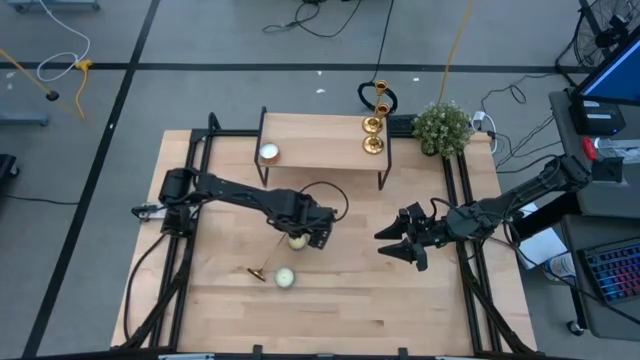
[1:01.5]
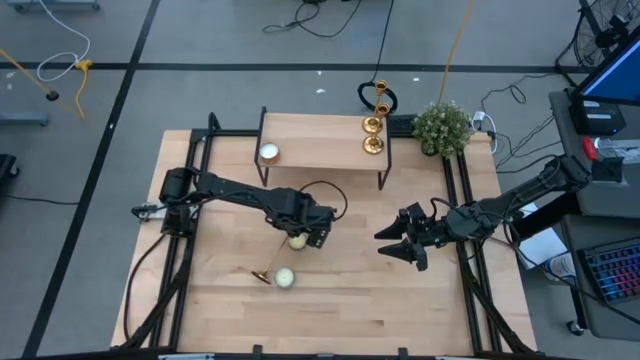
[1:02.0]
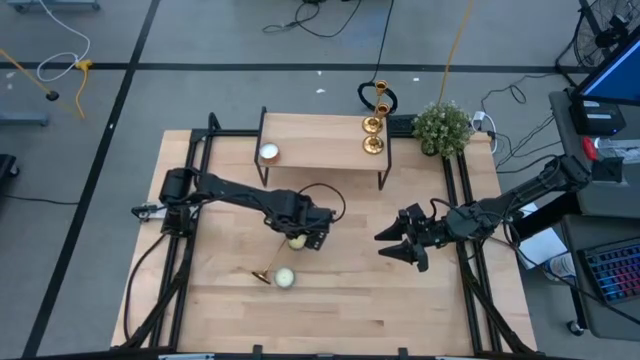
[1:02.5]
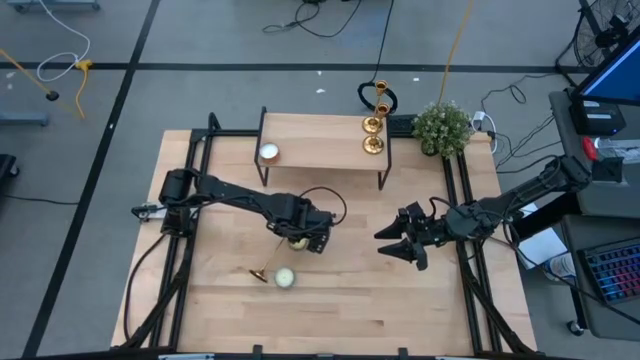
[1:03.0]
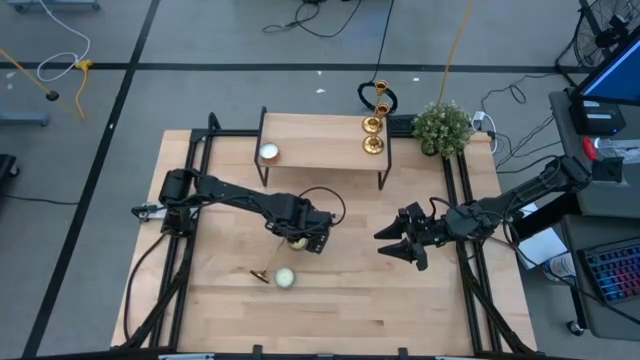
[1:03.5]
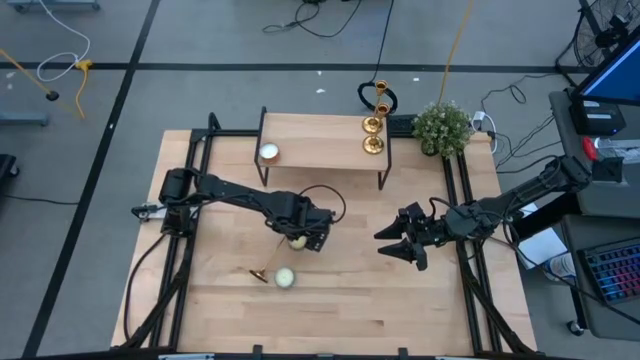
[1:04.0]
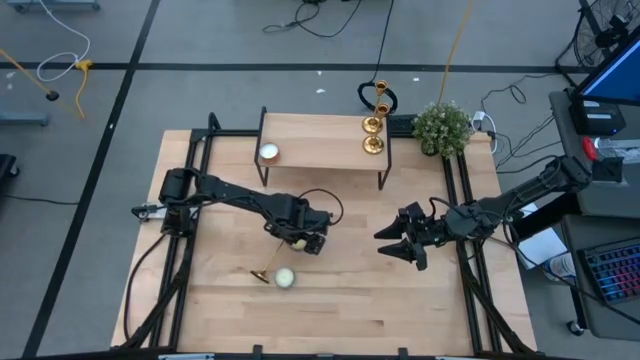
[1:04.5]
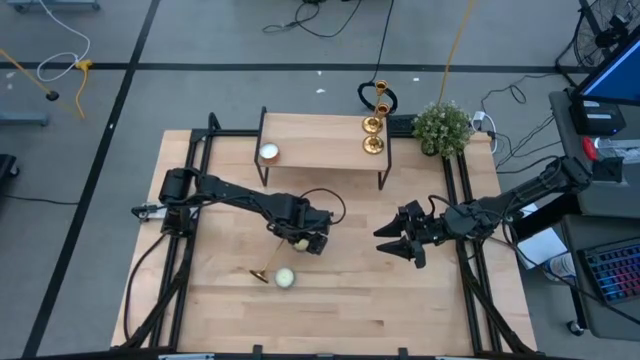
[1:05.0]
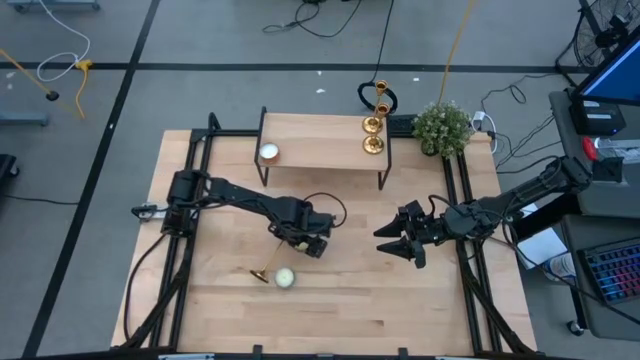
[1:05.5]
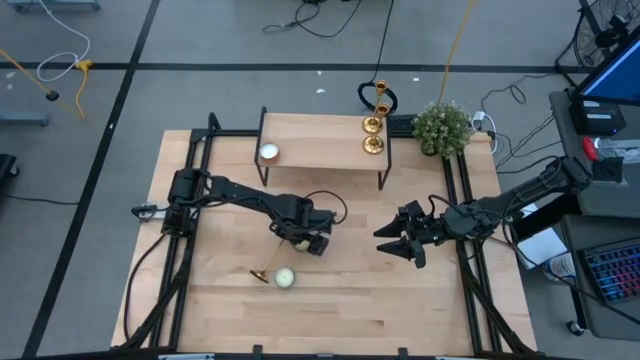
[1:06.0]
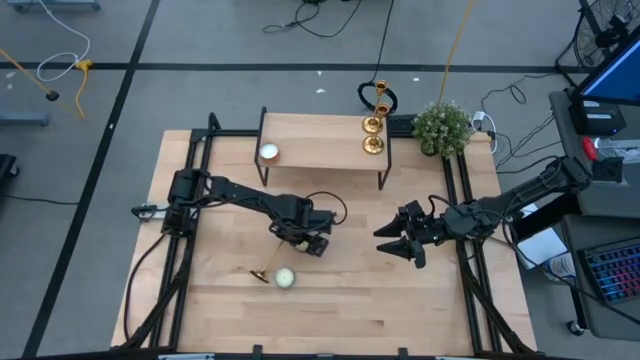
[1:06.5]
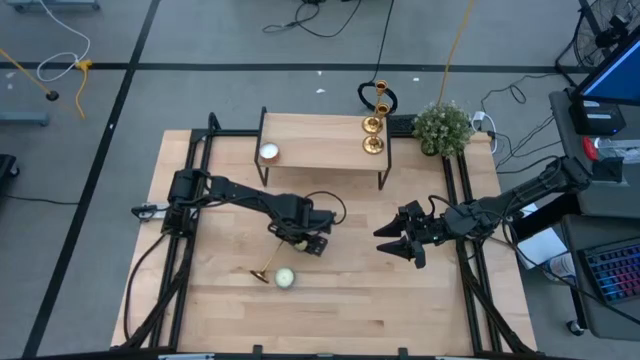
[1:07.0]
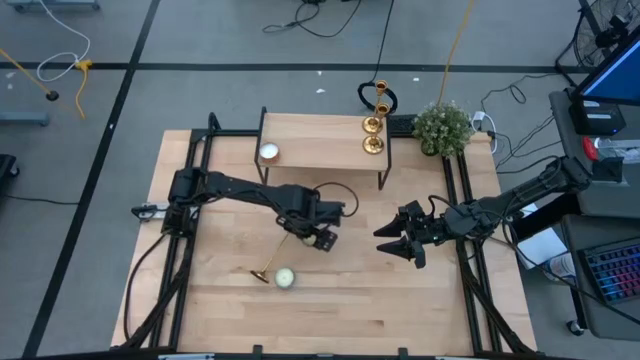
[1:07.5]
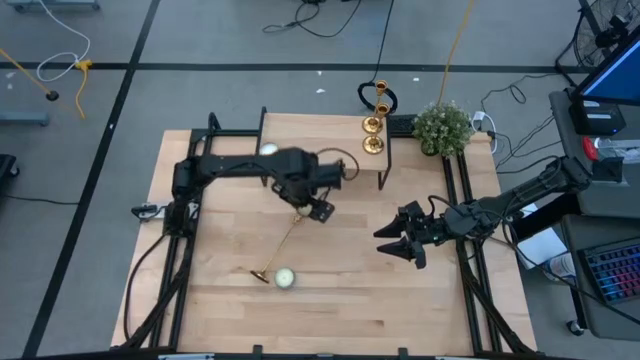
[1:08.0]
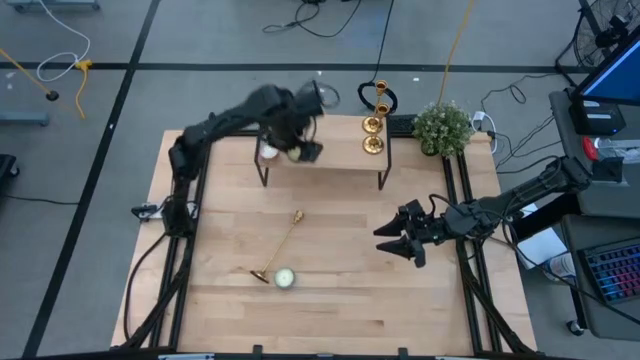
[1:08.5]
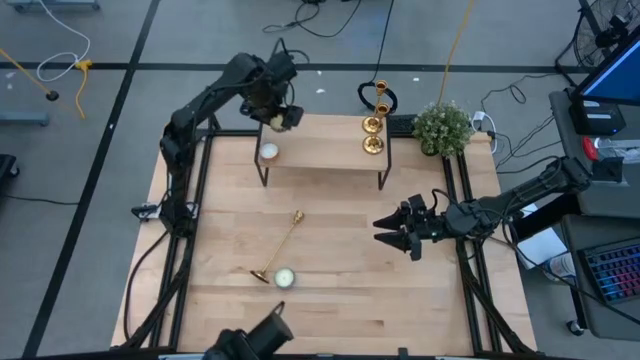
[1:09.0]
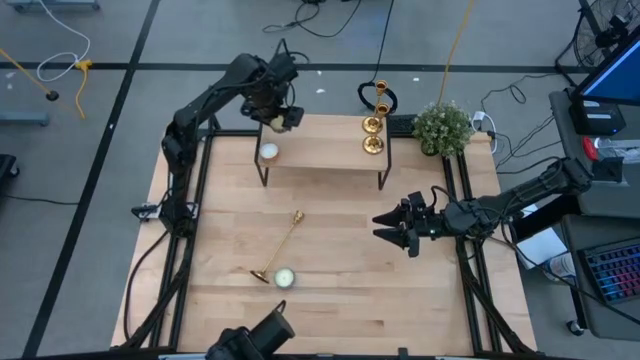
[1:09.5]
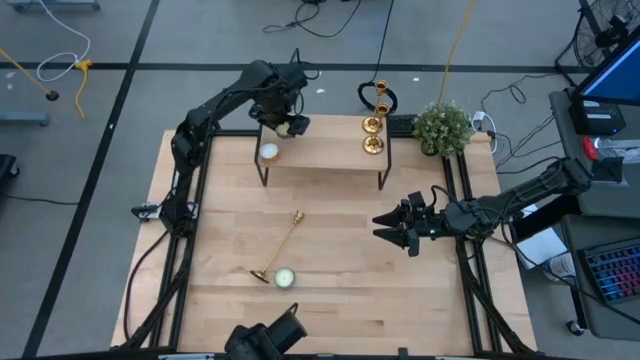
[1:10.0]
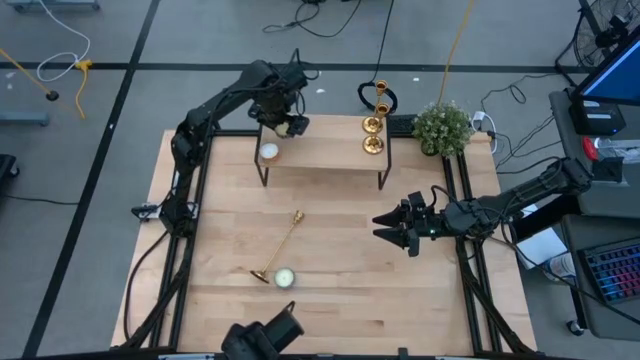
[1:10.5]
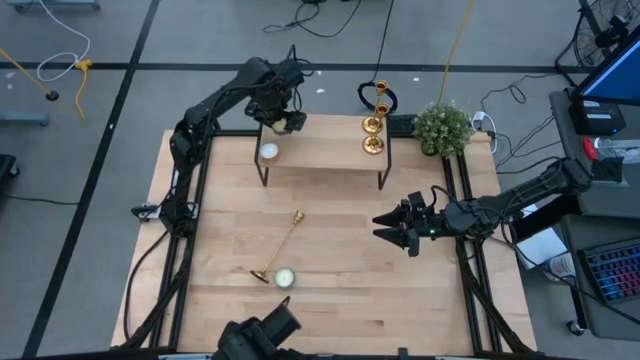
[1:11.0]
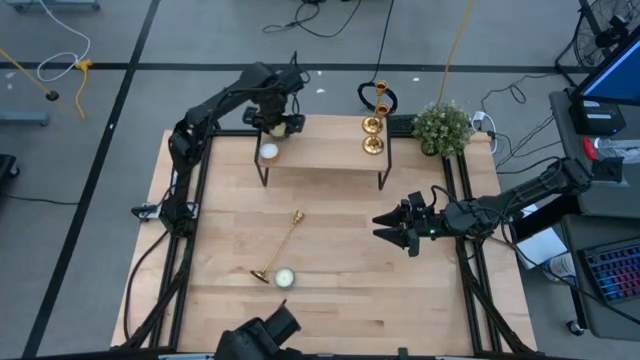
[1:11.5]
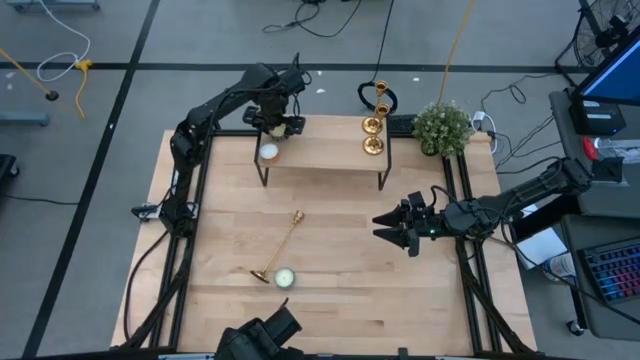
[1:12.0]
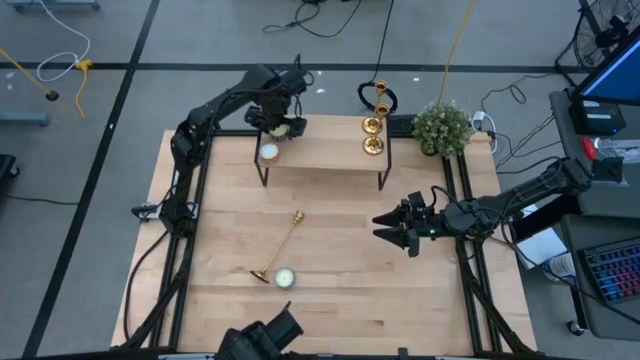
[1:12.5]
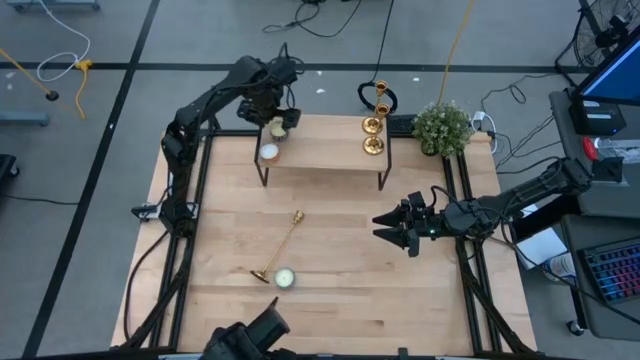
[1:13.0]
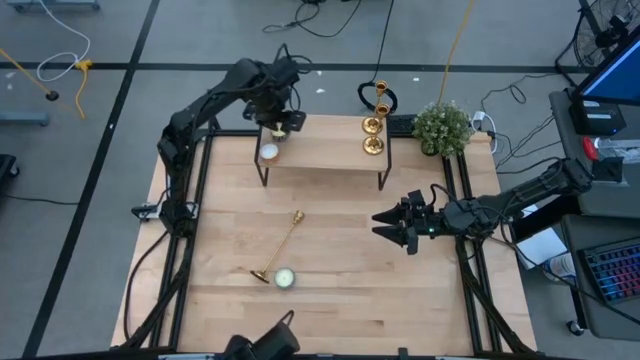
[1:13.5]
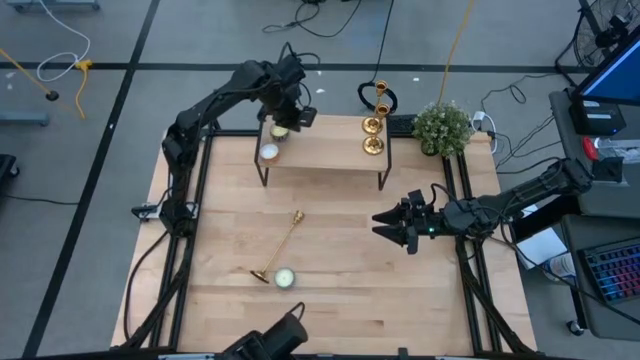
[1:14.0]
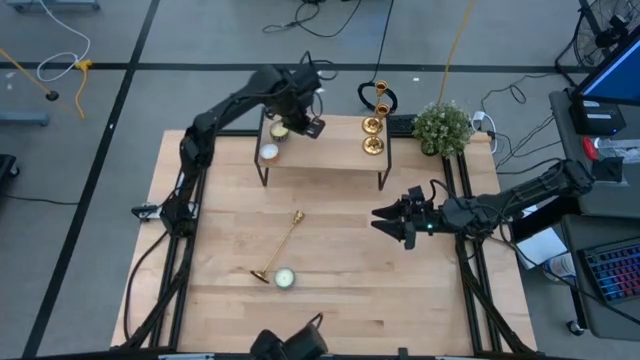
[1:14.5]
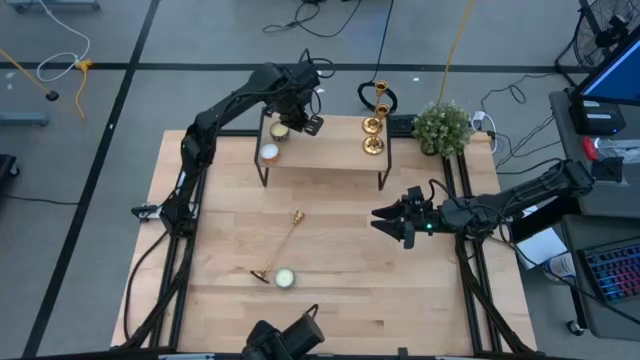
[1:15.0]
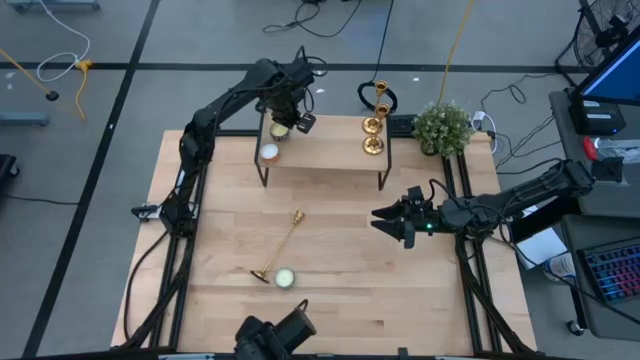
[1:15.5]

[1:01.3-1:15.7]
Task: Pick & Place candle stick holders
Put the black scented candle aligned with the orange scented candle on the shelf

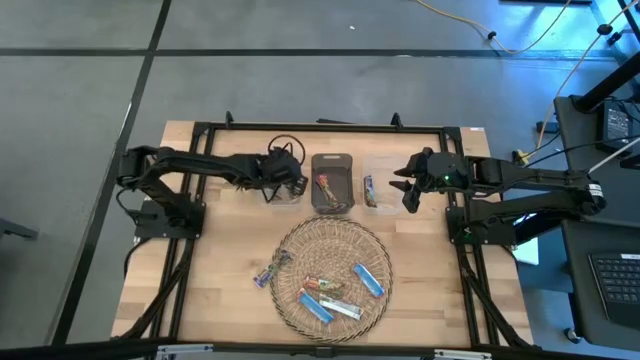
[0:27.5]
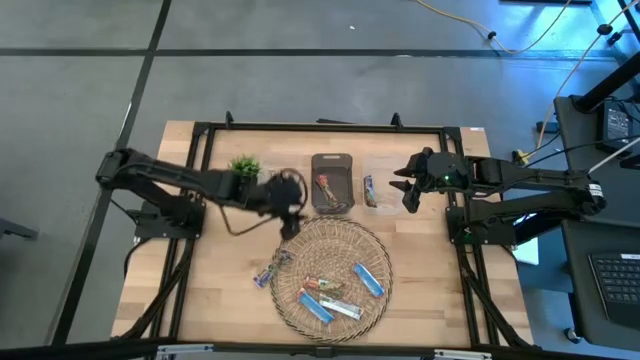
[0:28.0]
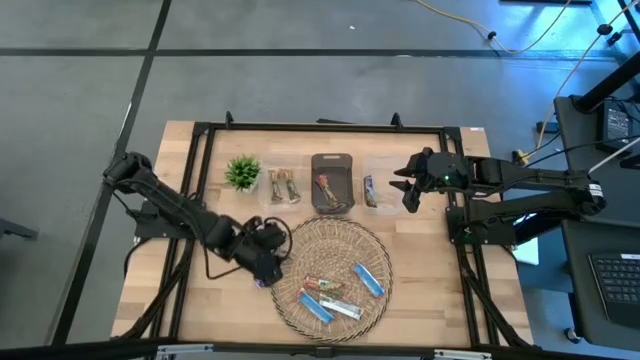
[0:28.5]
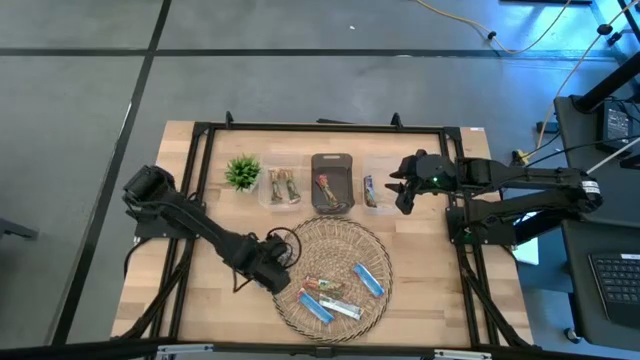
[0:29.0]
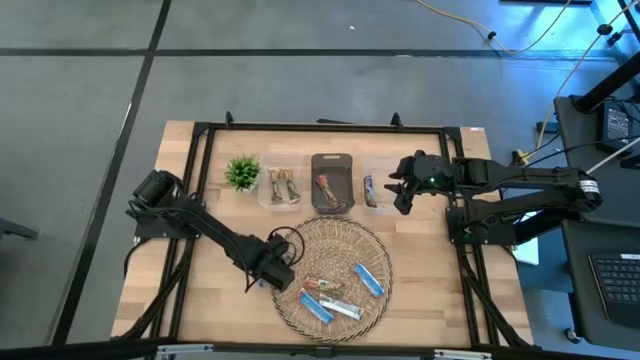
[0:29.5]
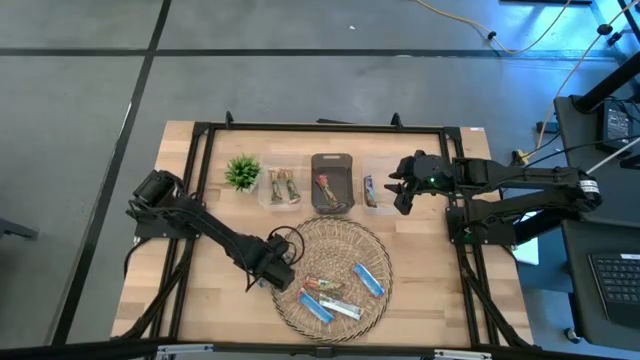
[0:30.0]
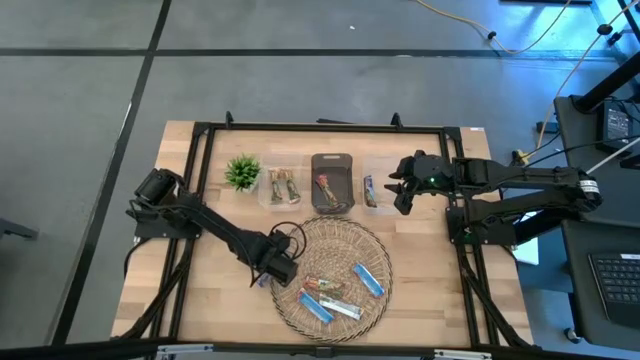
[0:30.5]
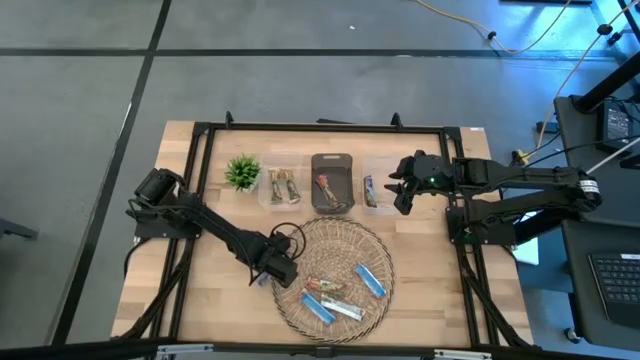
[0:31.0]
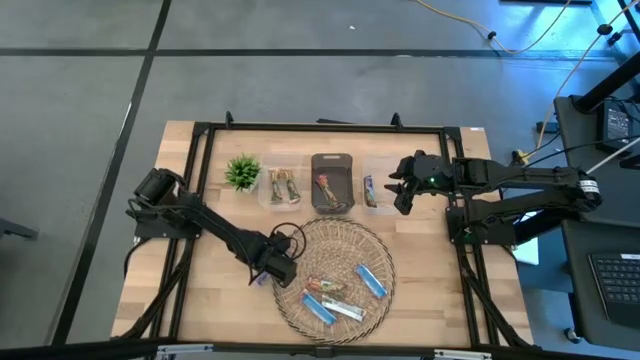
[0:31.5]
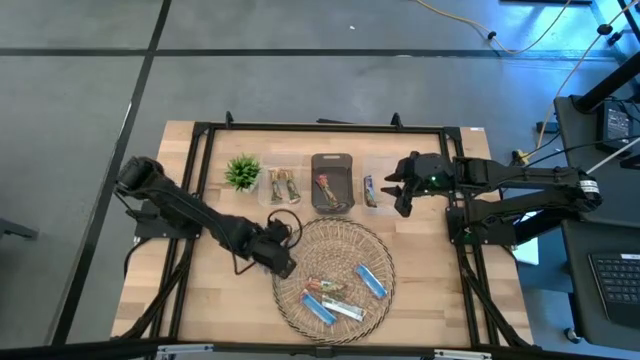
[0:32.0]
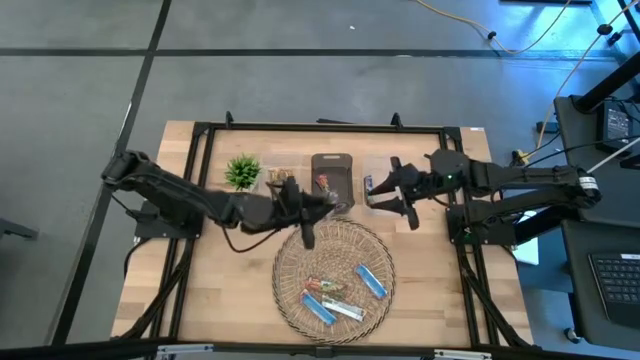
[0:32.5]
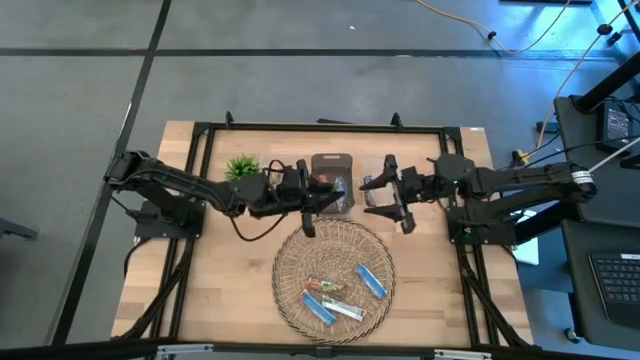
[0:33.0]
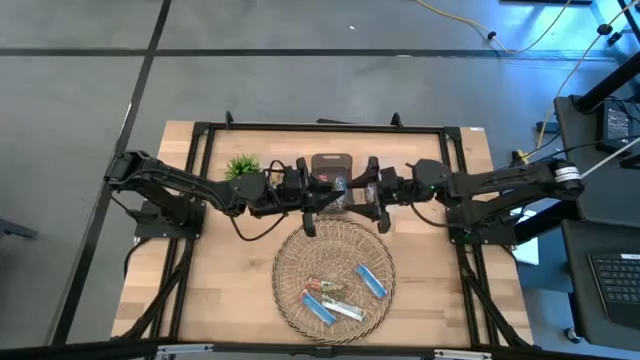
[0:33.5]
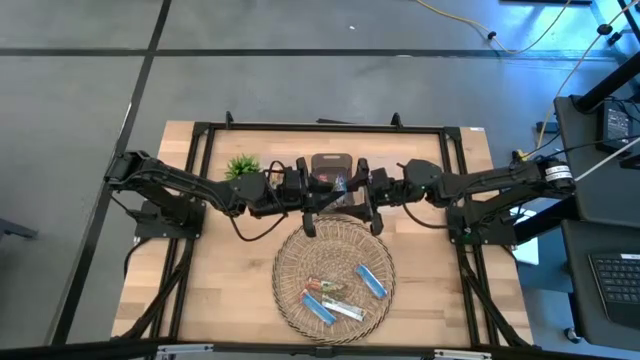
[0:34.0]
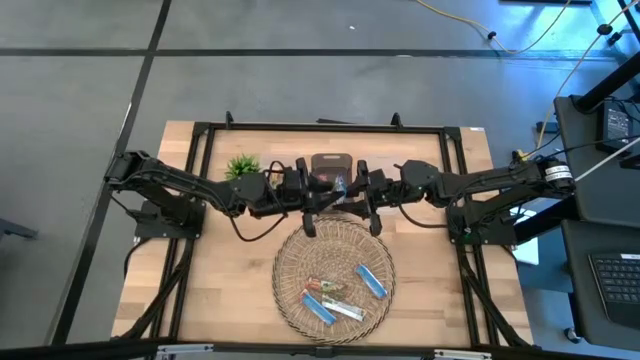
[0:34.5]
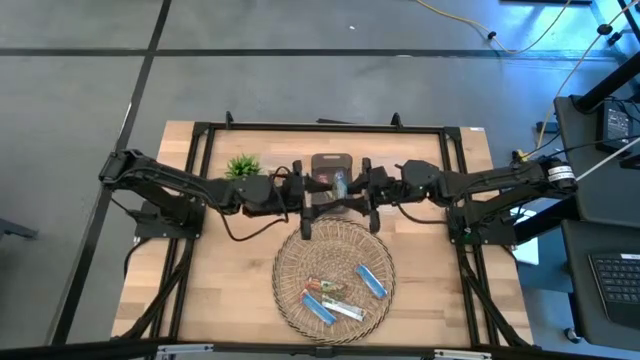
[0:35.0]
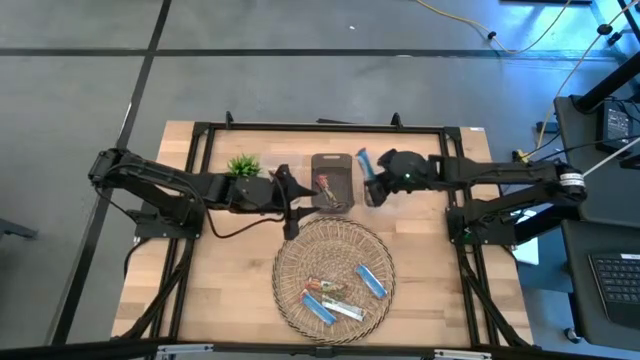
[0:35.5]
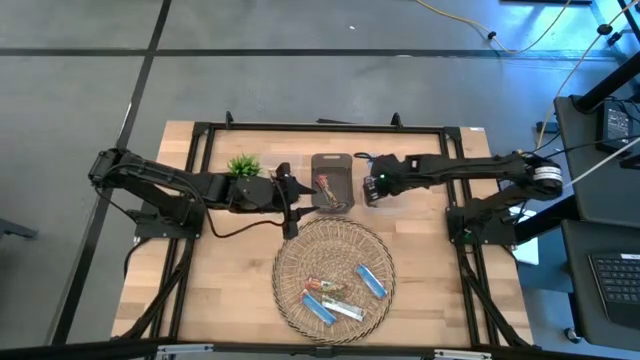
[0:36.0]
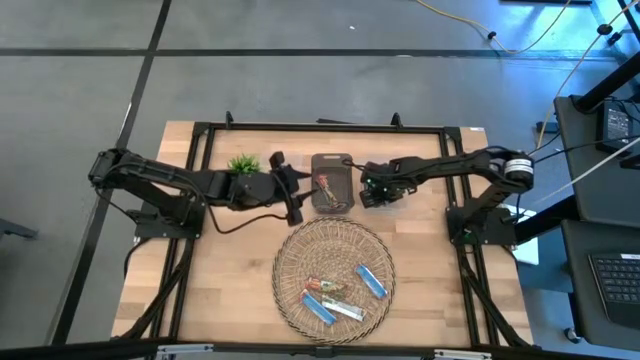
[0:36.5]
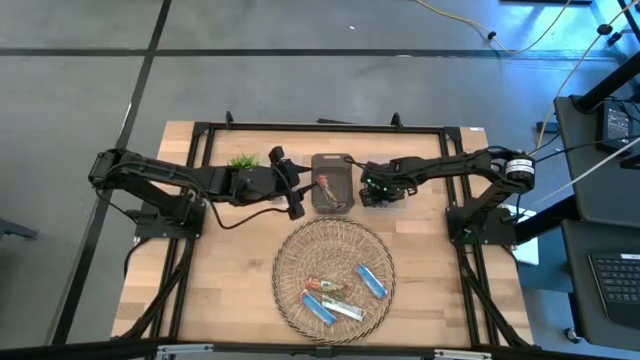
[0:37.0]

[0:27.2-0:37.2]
Task: Pick and place Granola Bars by type
Put the blue granola bar into the right transparent bin
